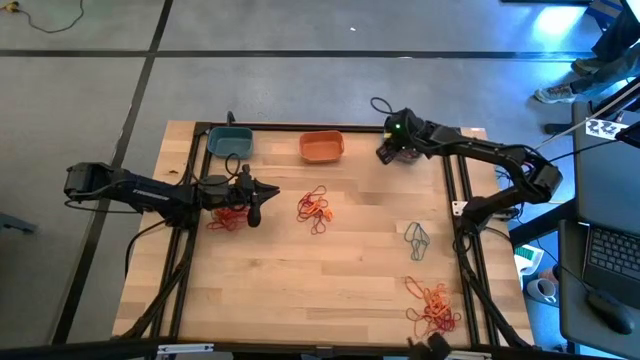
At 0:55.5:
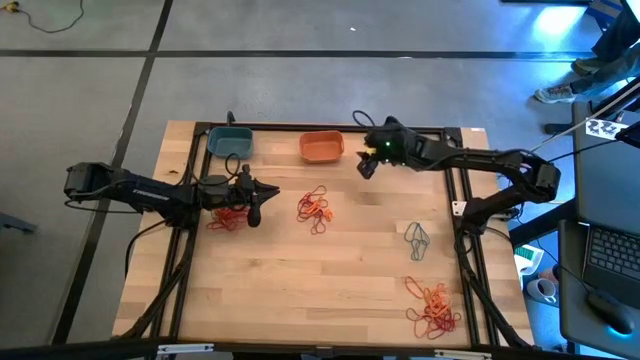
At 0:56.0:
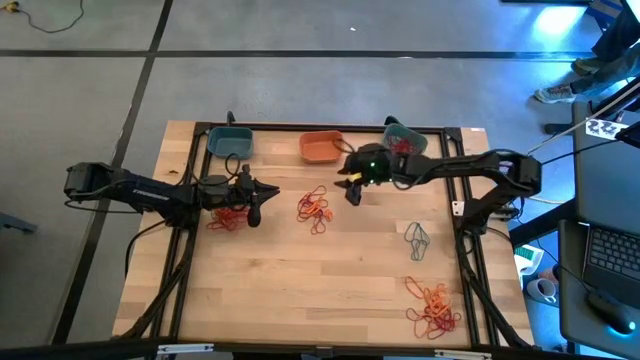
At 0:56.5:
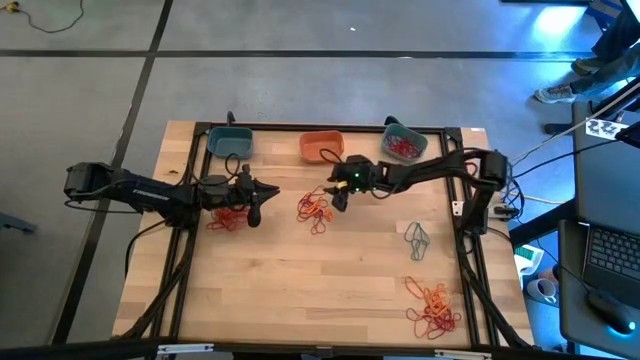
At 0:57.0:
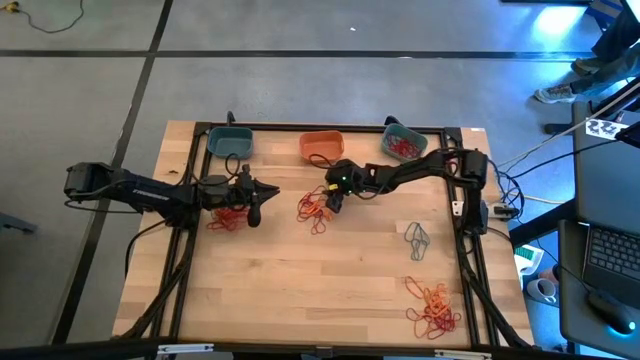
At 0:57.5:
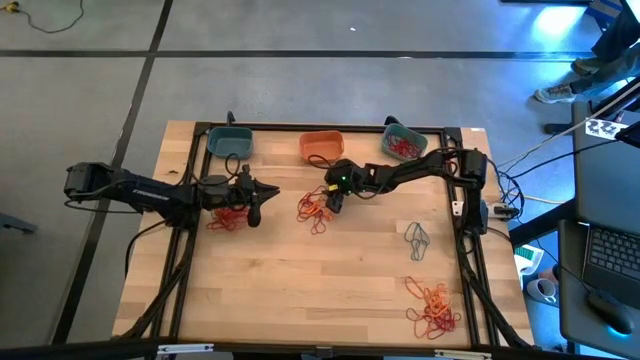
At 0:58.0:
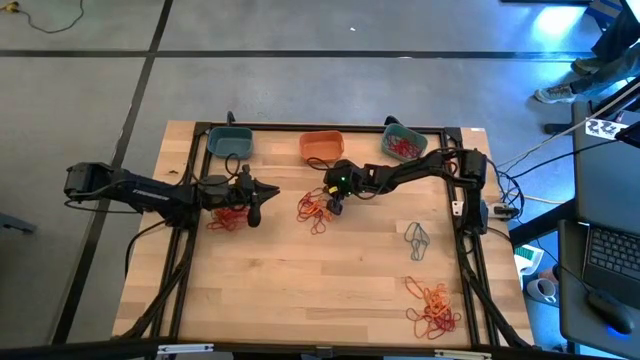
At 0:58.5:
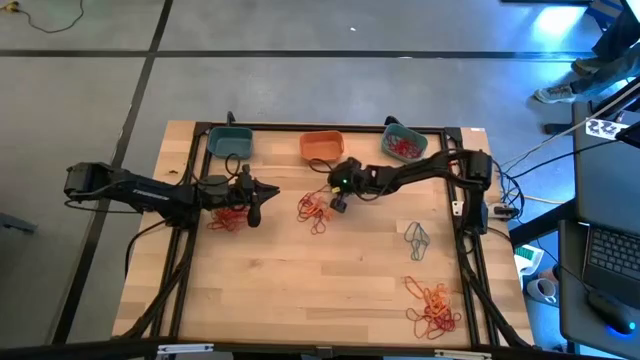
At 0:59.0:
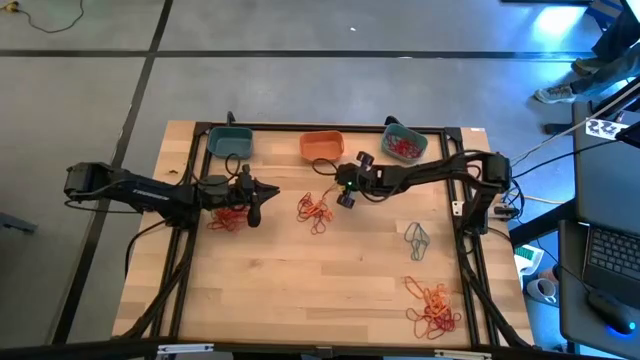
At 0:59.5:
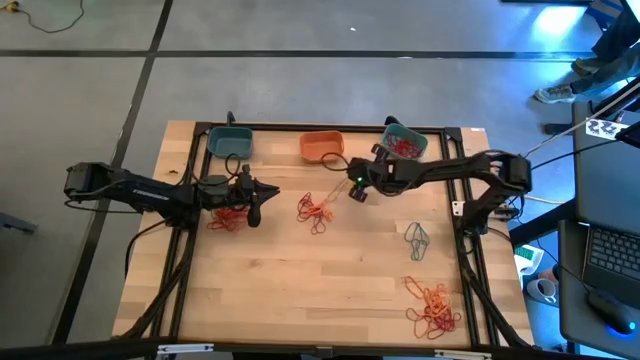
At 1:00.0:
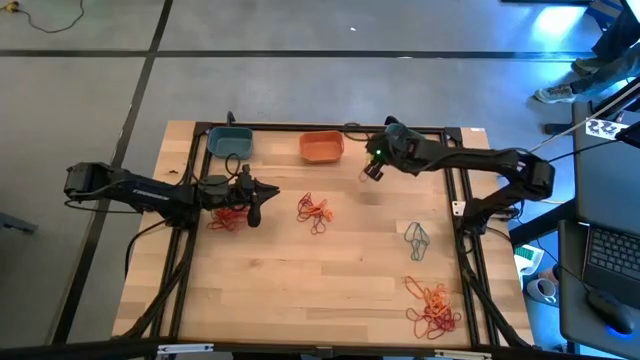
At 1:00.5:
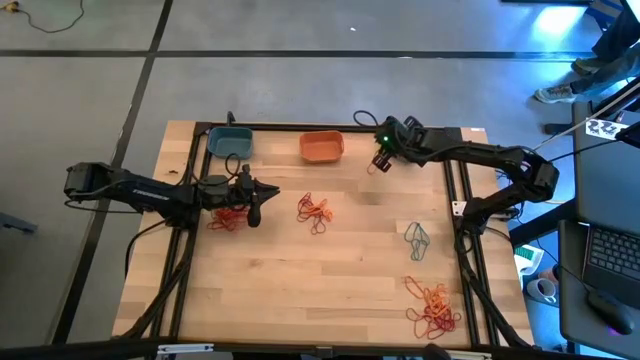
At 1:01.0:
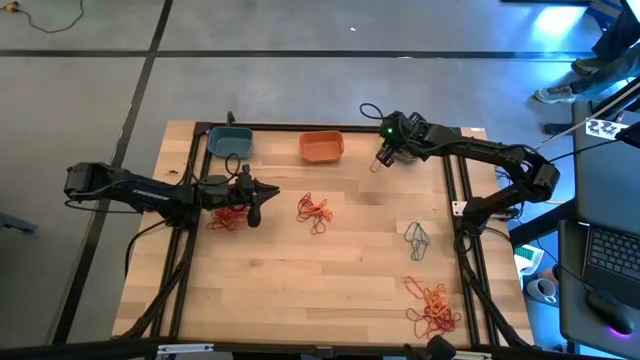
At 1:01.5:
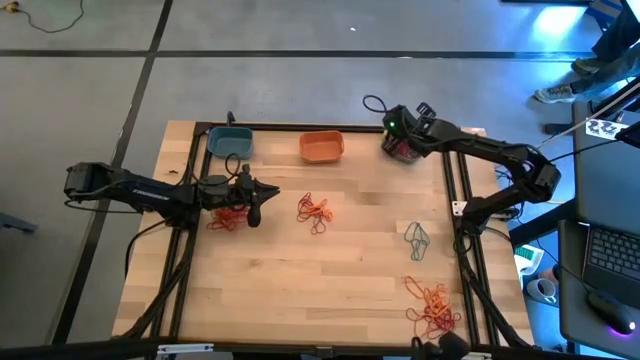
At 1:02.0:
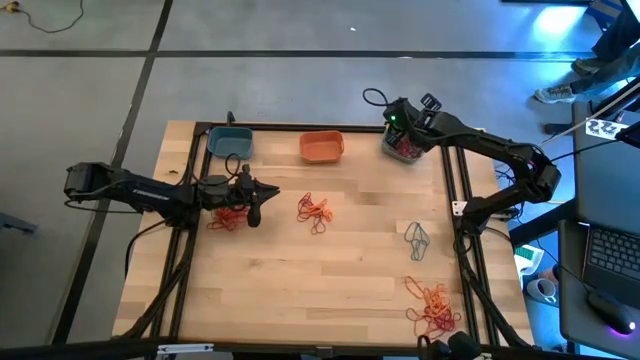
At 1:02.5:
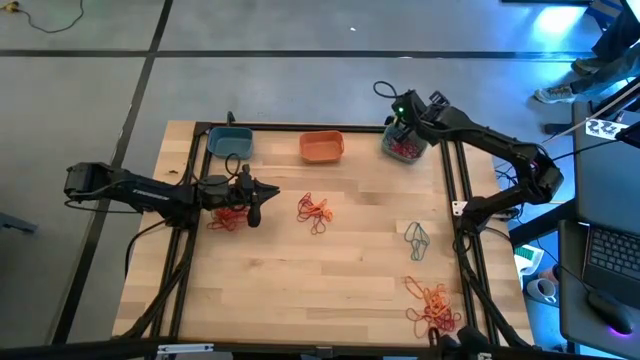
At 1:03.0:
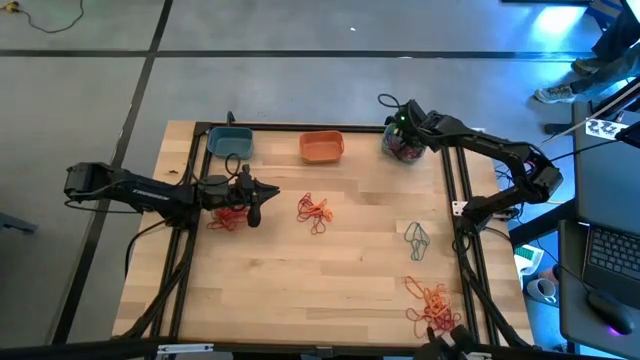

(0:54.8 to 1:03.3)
Task: Sort rubber bands into baskets
Put the red rubber band into the green bin

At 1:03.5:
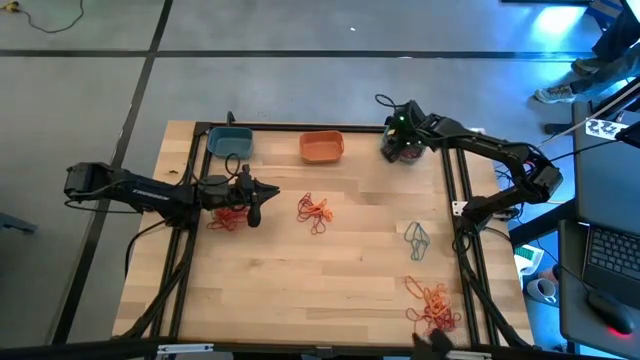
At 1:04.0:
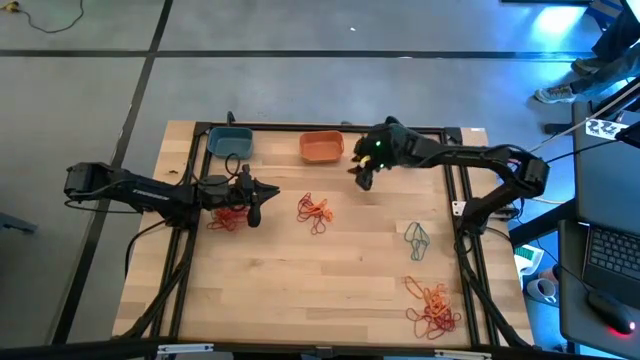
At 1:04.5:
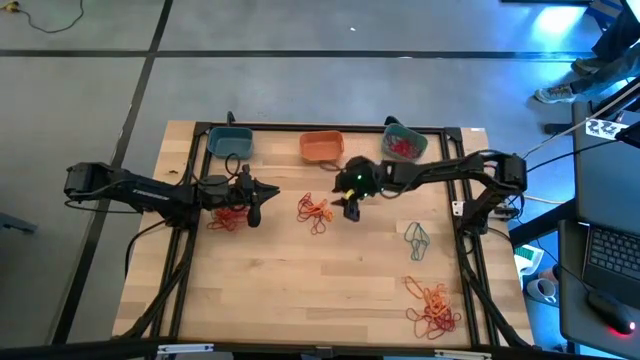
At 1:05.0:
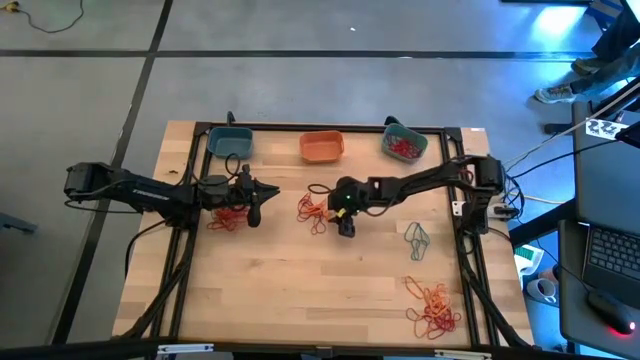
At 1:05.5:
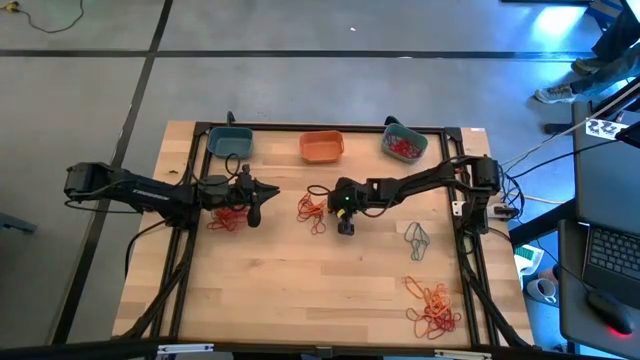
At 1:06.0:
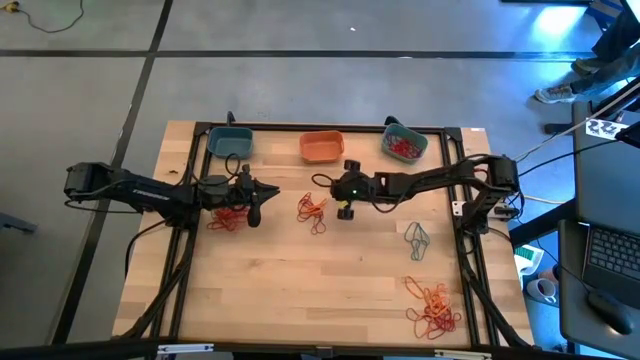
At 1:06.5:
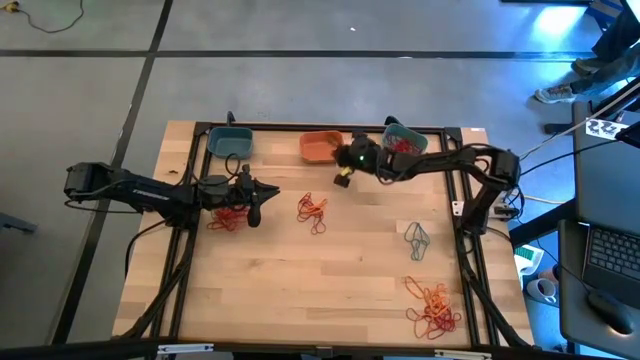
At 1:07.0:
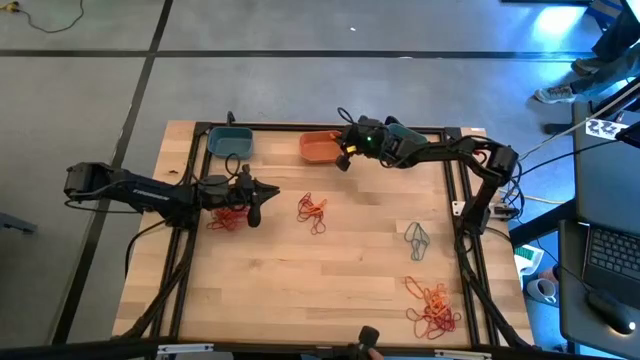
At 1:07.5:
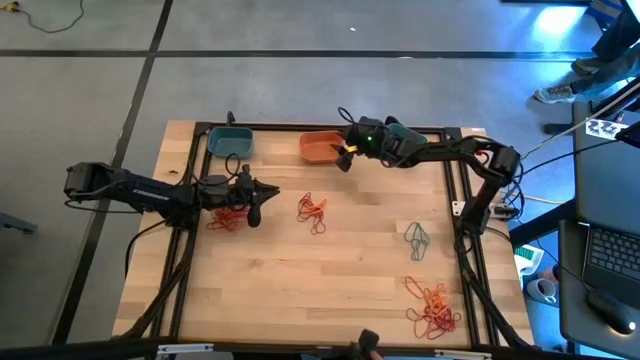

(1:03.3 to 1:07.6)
Put the orange rubber band into the orange bin

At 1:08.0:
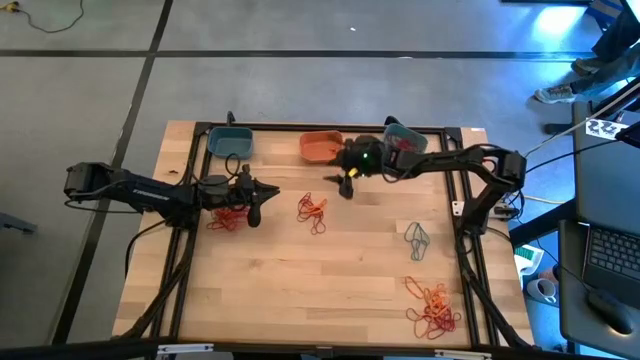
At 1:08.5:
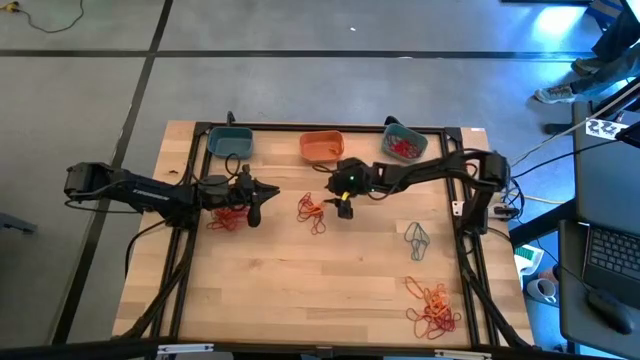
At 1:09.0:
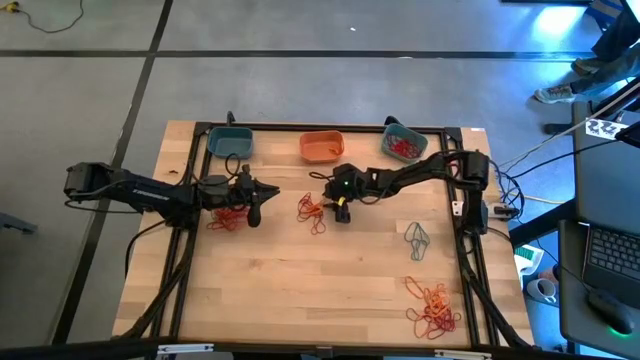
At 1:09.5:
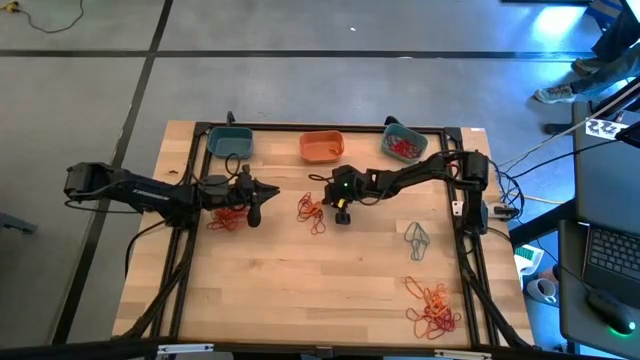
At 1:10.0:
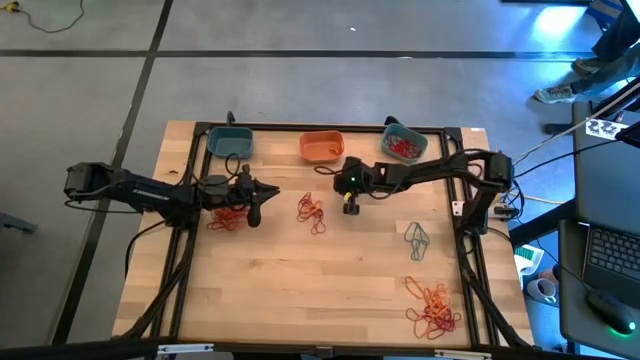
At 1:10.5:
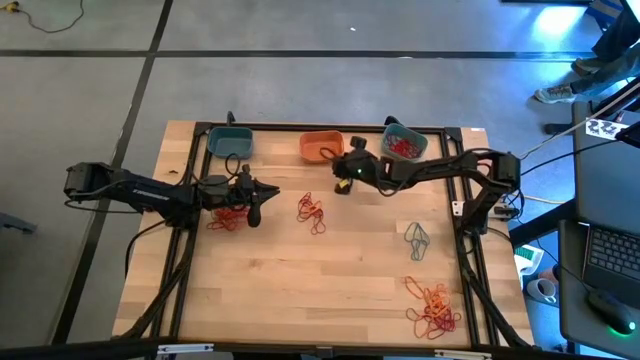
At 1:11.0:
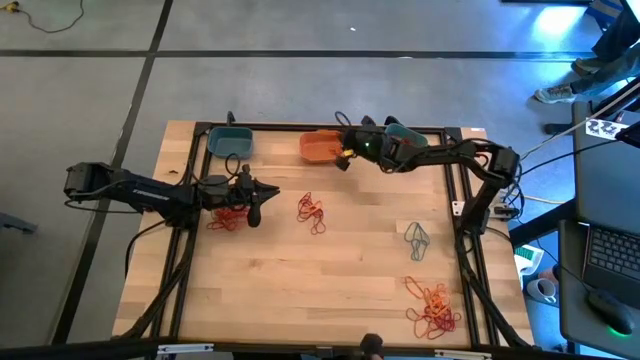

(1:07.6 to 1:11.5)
Put the orange rubber band into the orange bin

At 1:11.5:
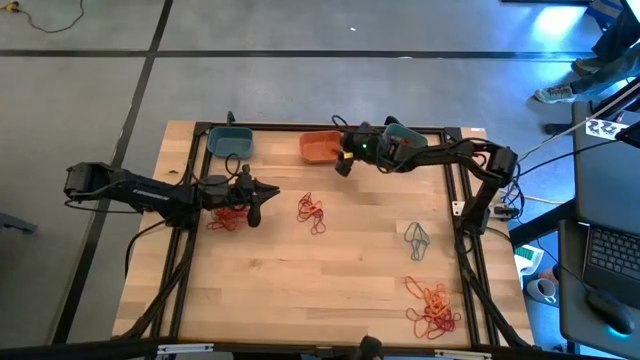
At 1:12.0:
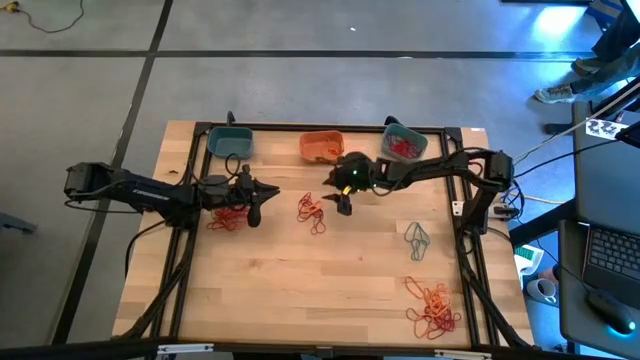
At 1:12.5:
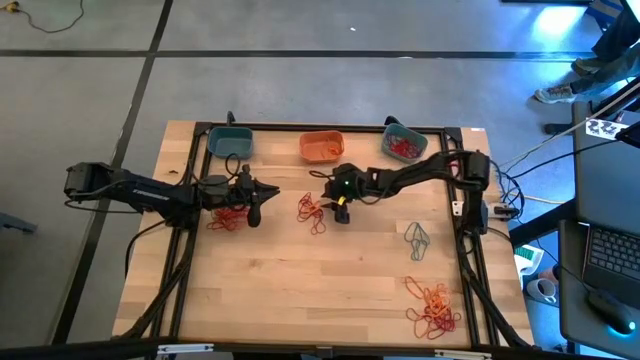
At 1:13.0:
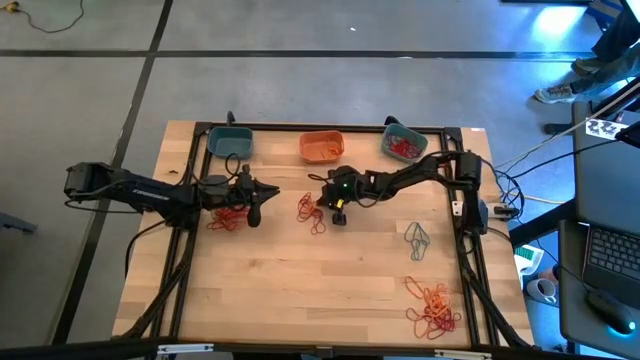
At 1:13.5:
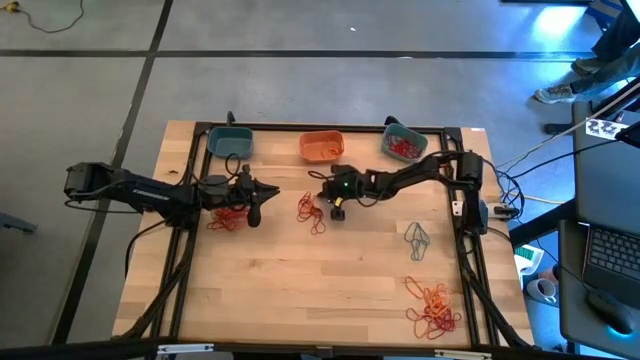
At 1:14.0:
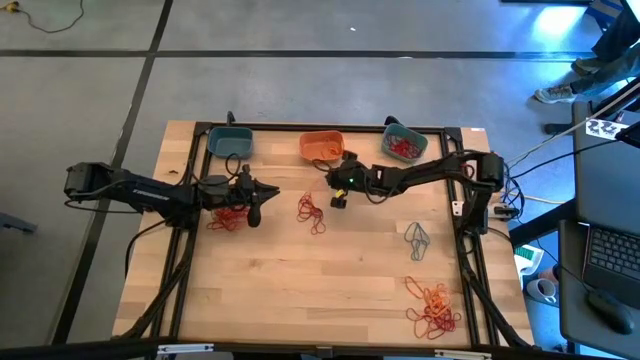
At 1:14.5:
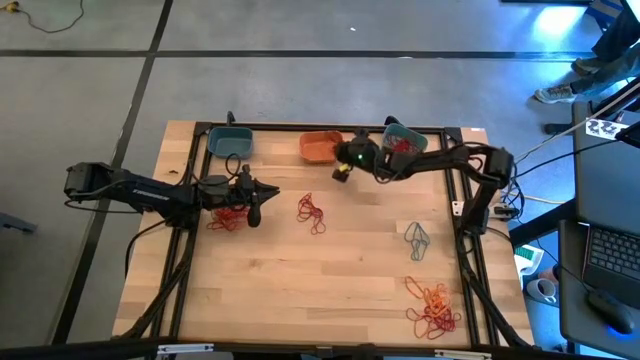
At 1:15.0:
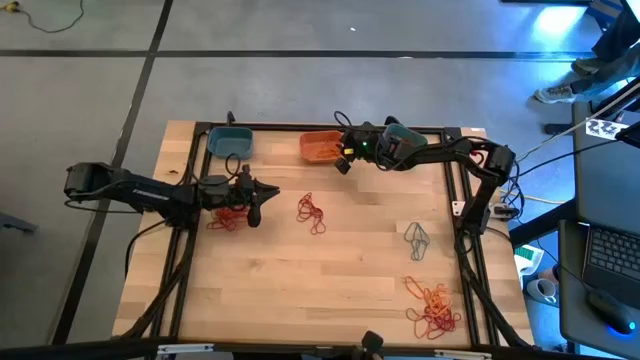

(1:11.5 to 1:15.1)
Put the orange rubber band into the orange bin
